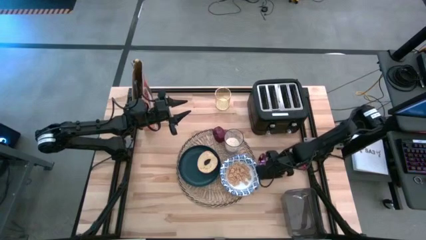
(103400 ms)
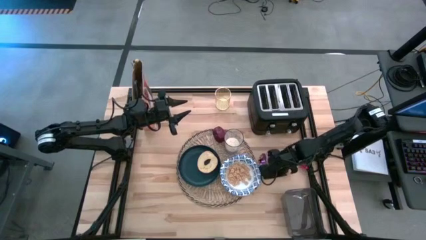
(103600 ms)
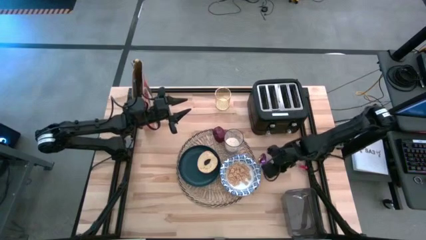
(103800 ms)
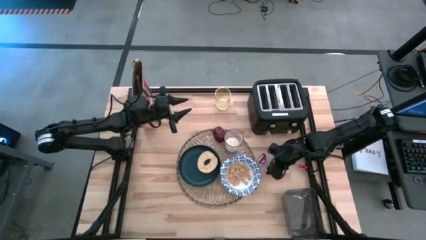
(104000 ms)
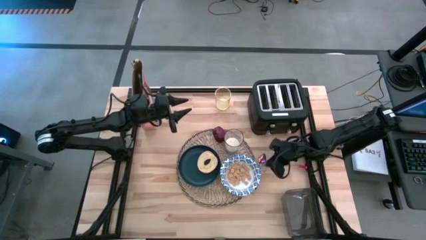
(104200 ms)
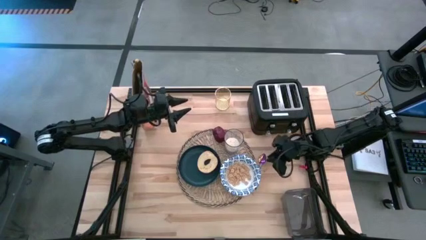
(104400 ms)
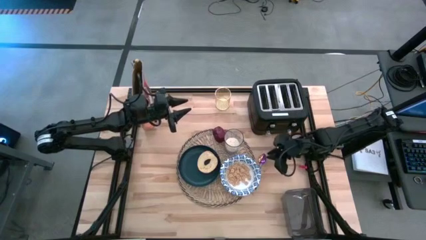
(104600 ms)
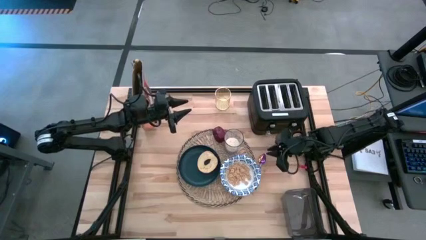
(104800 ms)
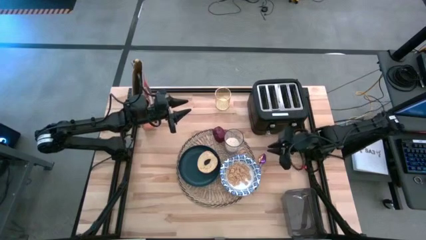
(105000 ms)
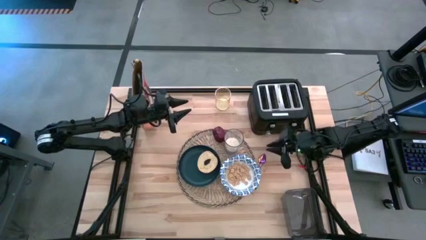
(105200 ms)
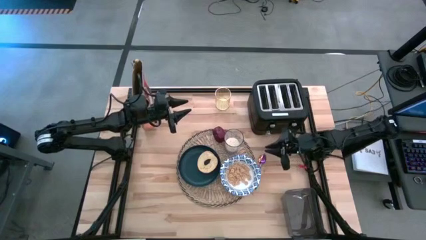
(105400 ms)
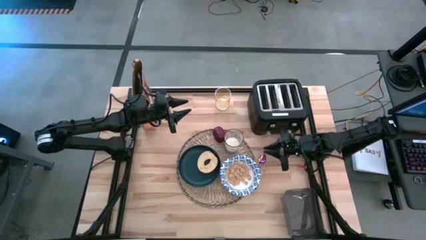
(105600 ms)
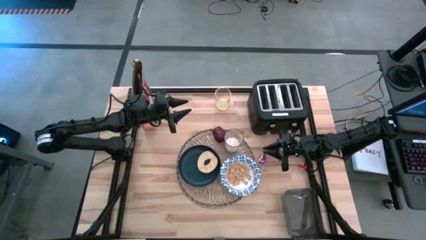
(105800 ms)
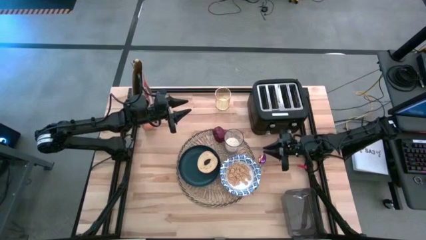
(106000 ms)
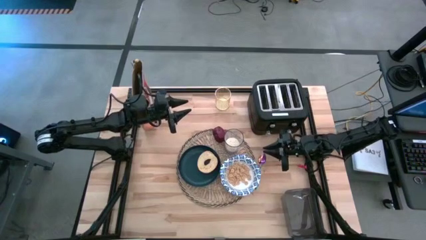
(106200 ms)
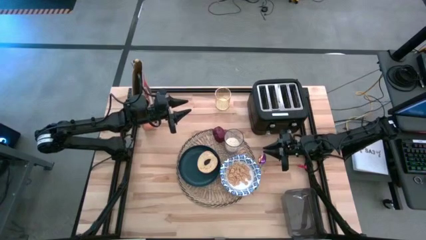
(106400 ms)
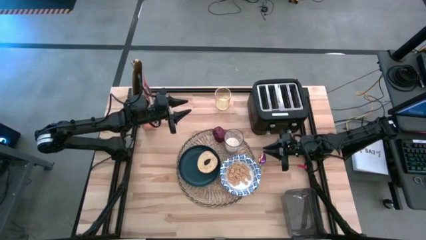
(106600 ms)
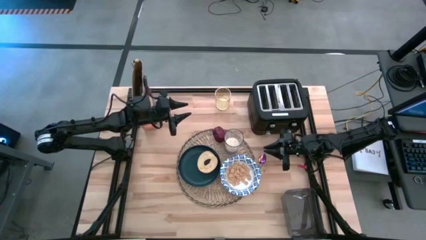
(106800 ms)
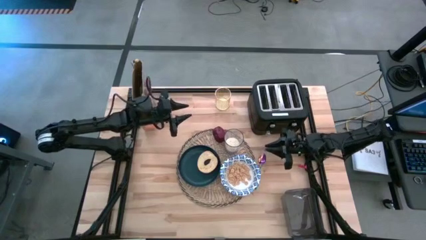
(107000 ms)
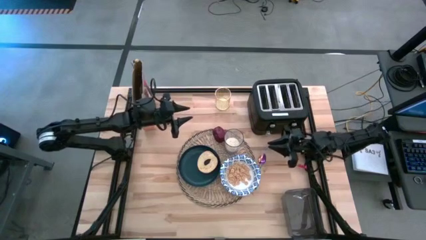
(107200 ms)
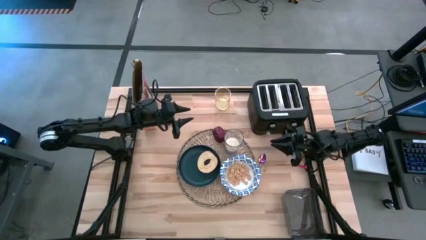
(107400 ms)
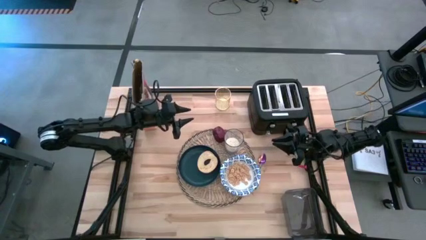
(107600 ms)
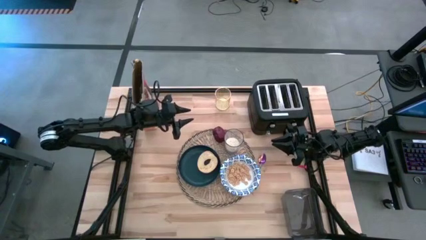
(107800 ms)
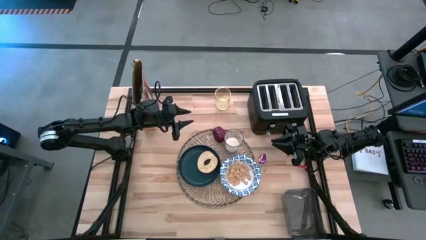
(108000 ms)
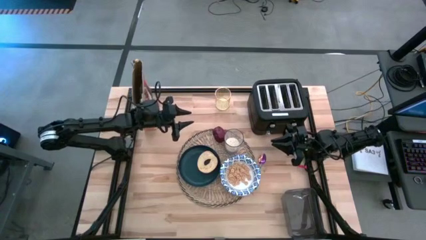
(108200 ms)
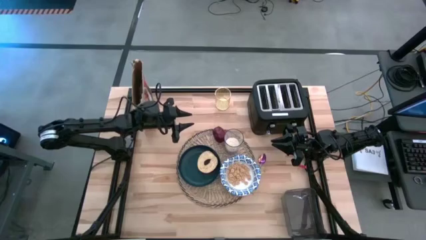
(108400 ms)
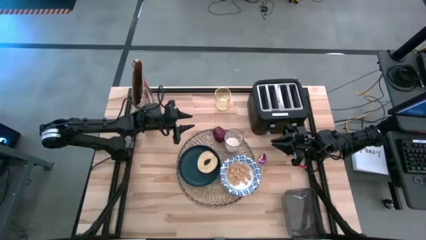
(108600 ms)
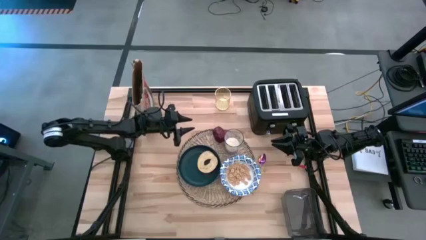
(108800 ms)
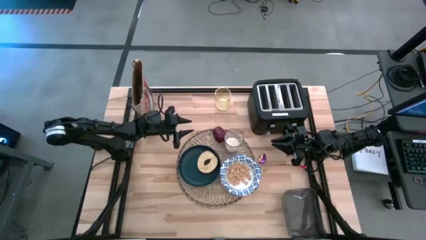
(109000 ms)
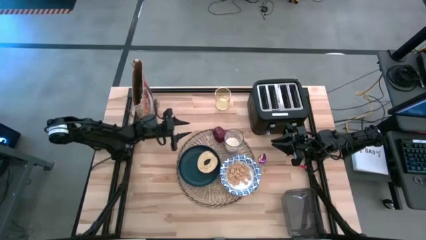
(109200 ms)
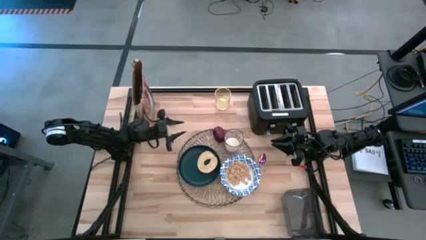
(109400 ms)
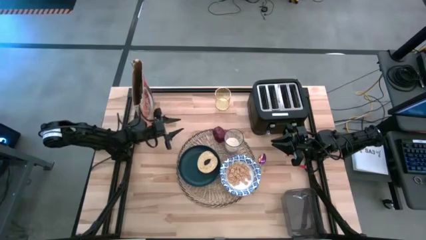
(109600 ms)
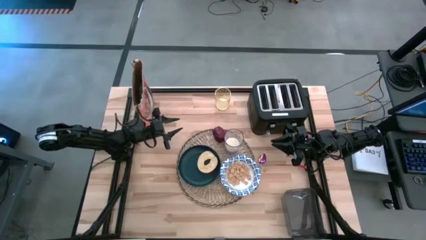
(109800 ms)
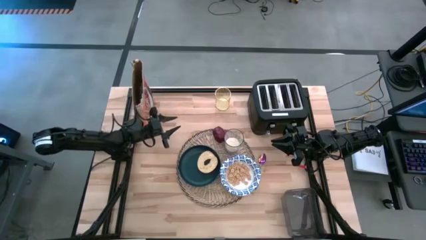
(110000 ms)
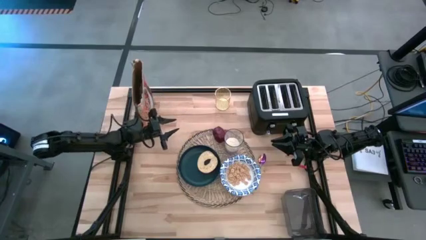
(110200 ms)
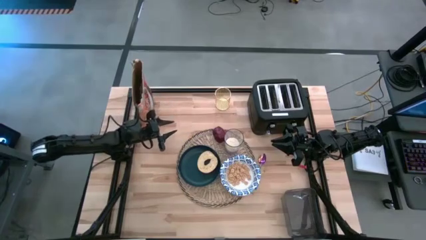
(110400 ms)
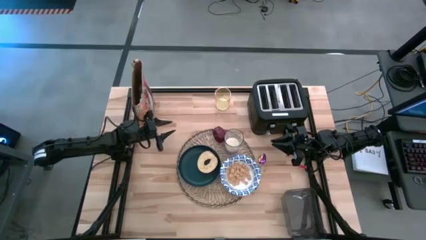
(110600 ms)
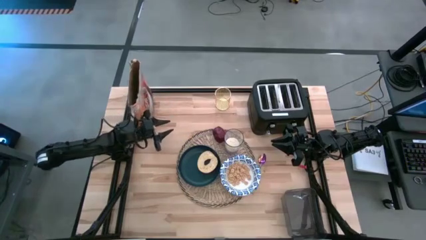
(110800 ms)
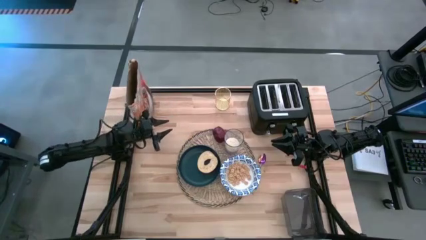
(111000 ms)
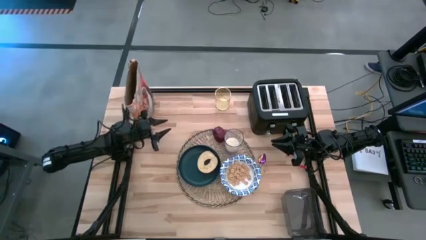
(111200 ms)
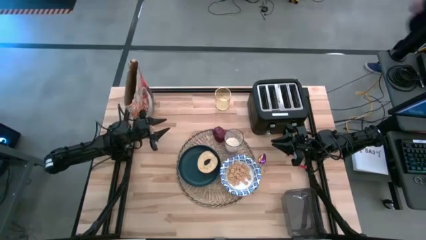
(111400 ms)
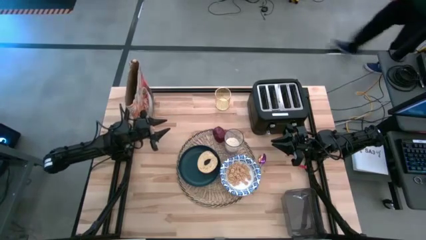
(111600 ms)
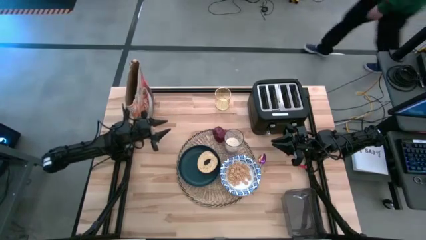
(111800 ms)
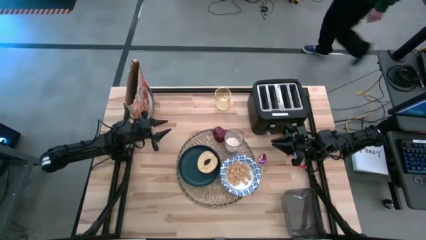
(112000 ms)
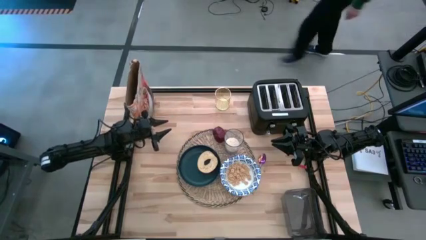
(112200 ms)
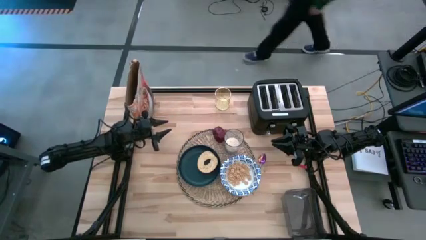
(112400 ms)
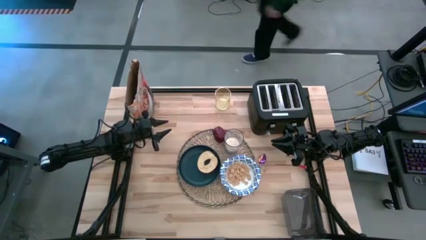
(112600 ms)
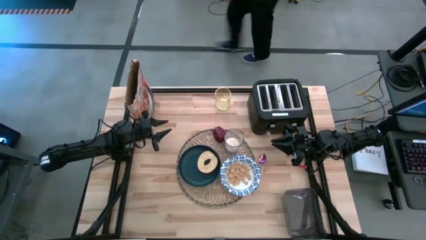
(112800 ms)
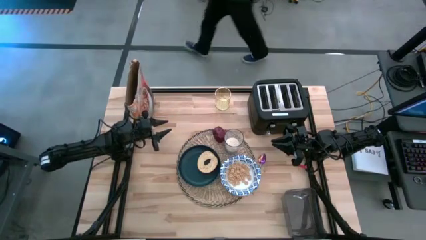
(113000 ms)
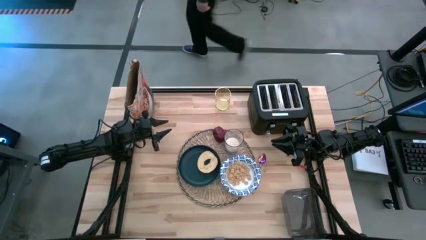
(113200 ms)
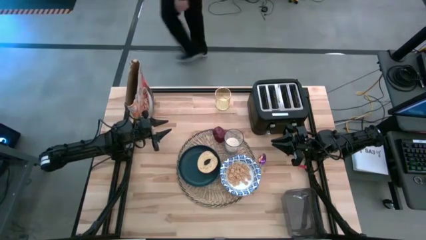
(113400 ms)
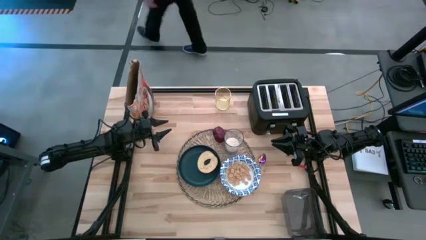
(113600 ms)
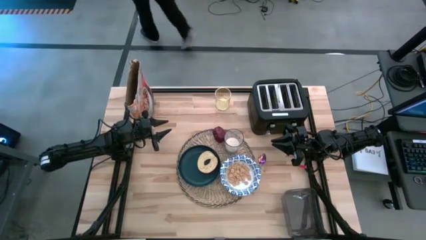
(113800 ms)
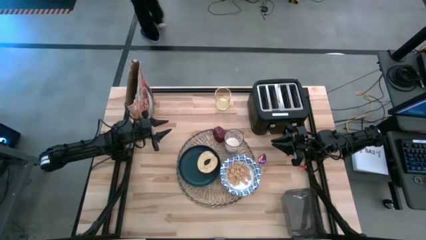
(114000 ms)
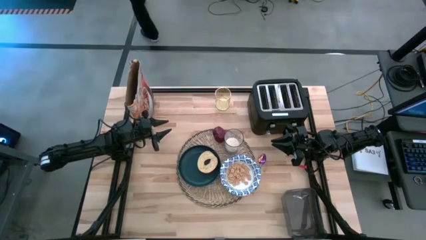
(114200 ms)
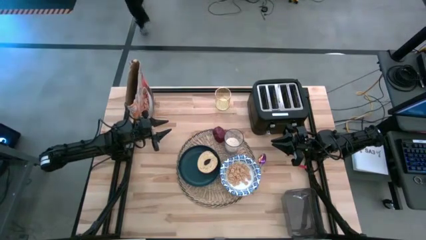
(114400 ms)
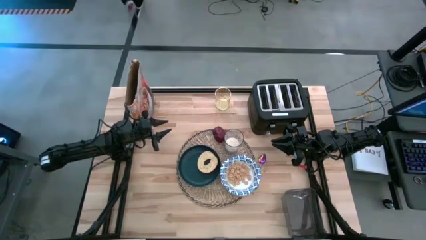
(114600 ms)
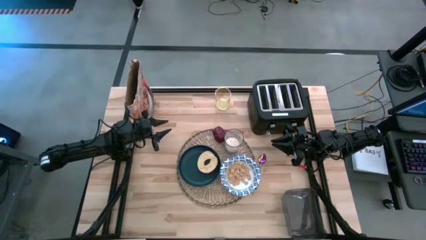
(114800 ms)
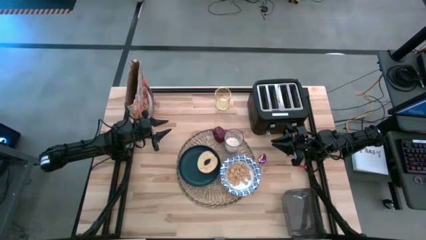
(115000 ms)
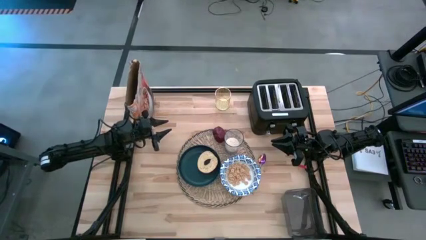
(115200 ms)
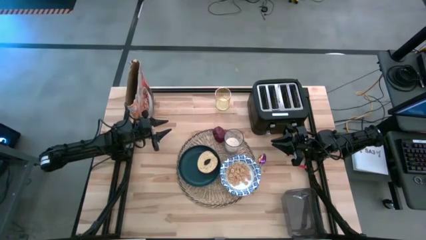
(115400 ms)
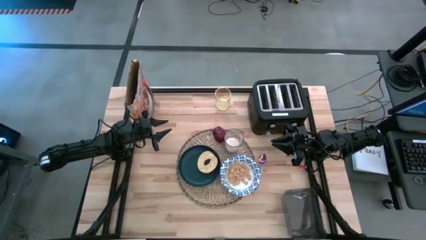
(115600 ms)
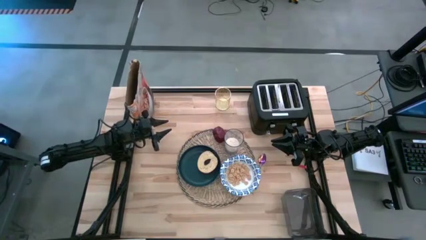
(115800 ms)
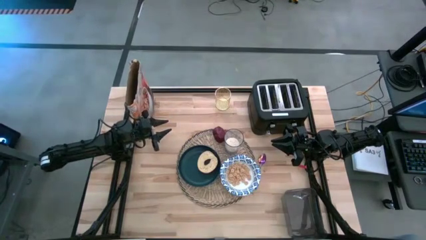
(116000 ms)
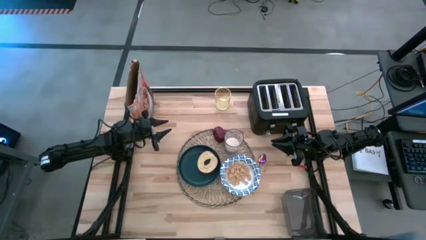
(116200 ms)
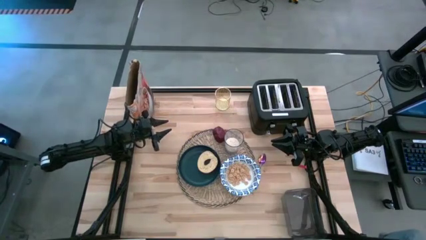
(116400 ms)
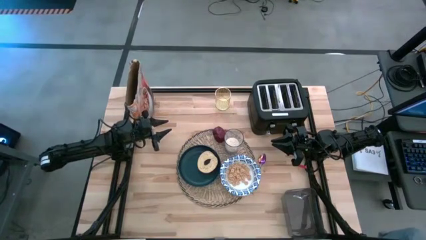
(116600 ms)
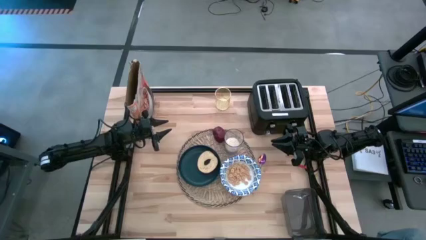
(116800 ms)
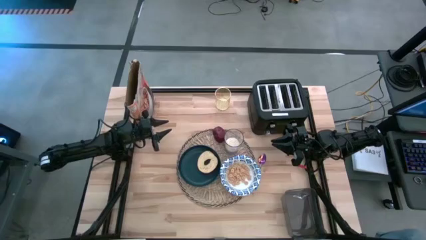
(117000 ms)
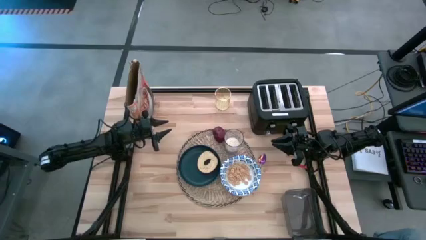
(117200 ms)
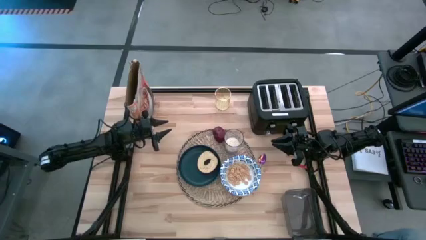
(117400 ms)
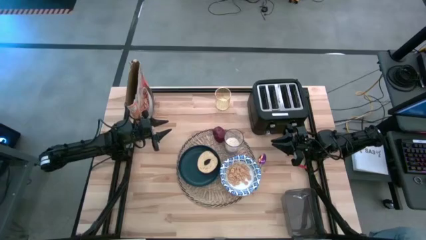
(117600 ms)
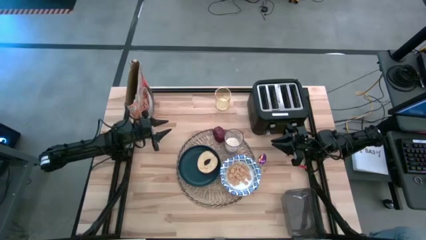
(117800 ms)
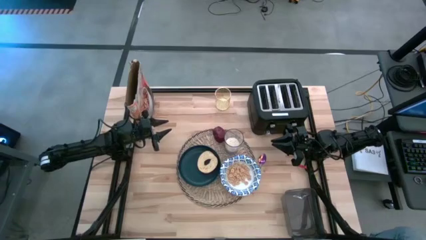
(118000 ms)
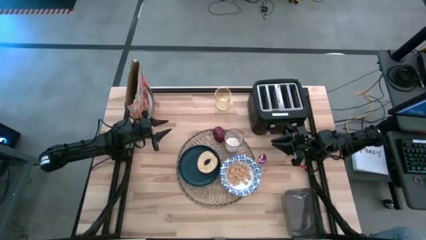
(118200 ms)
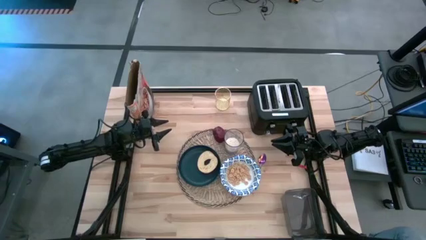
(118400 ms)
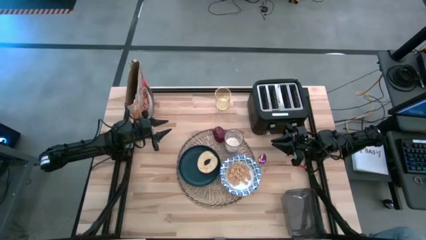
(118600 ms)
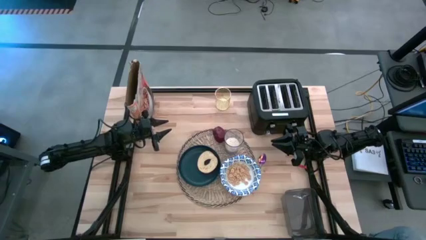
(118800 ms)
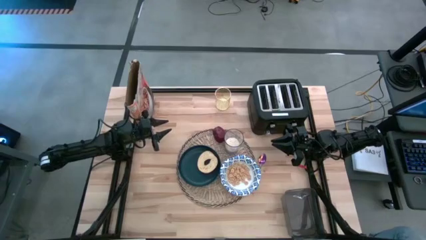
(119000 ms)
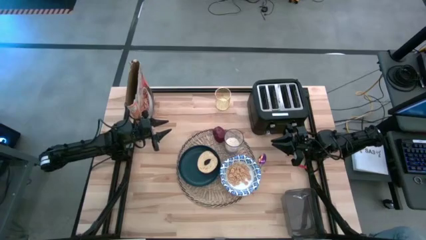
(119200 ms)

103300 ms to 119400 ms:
Task: Arrange a breakfast setting
Return to Home Position
